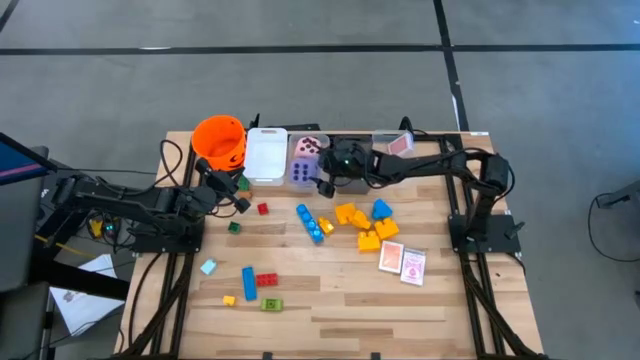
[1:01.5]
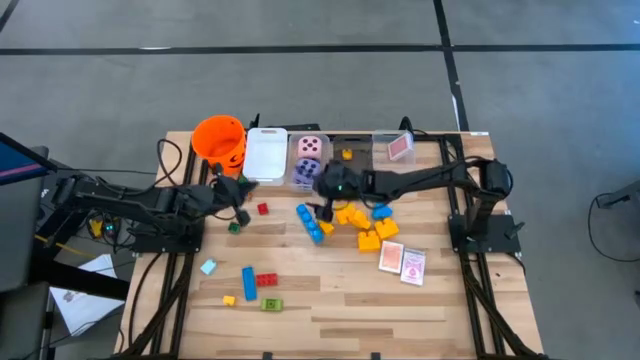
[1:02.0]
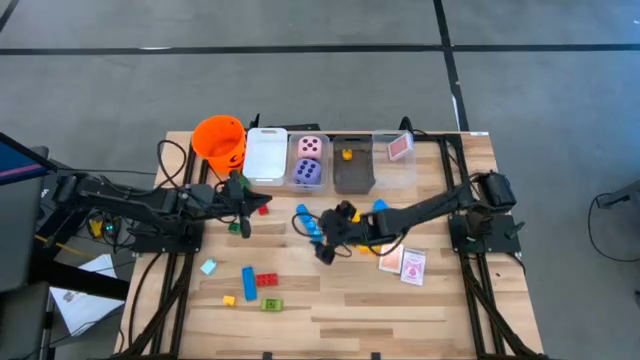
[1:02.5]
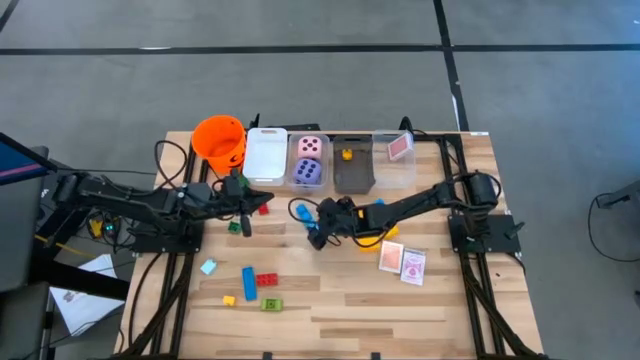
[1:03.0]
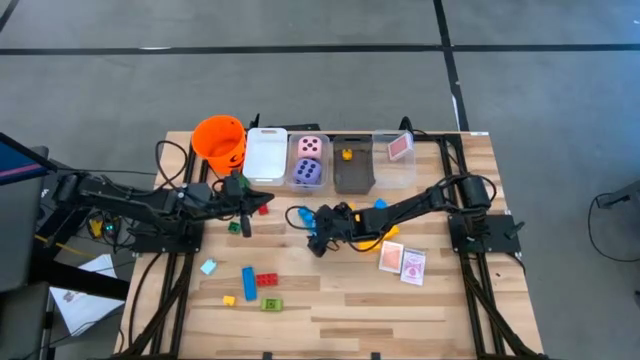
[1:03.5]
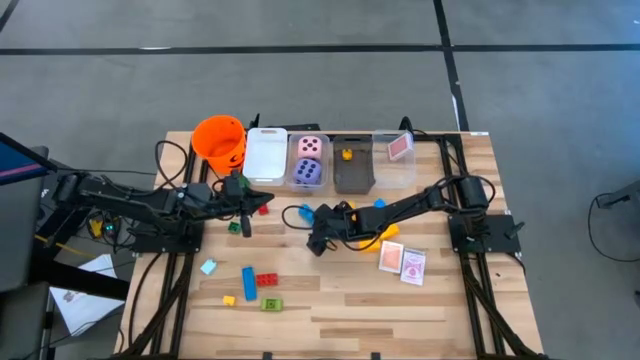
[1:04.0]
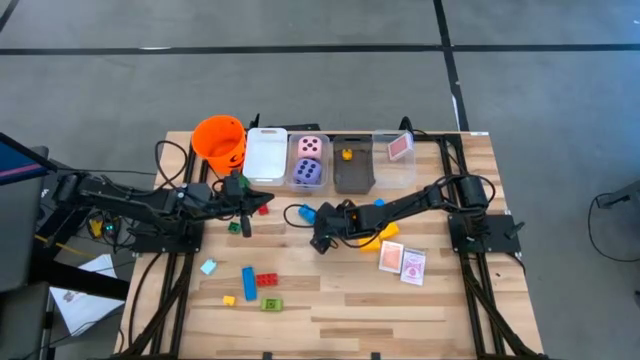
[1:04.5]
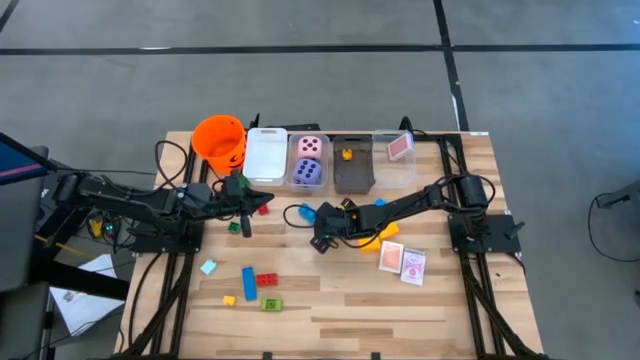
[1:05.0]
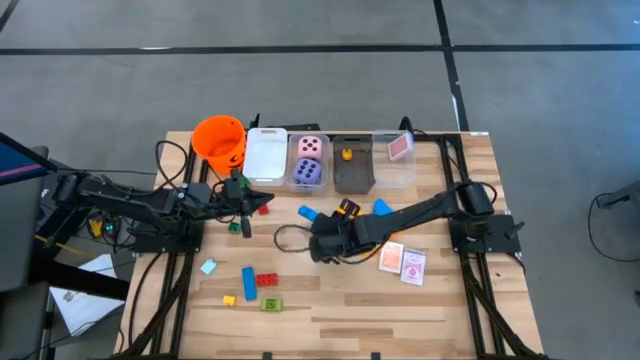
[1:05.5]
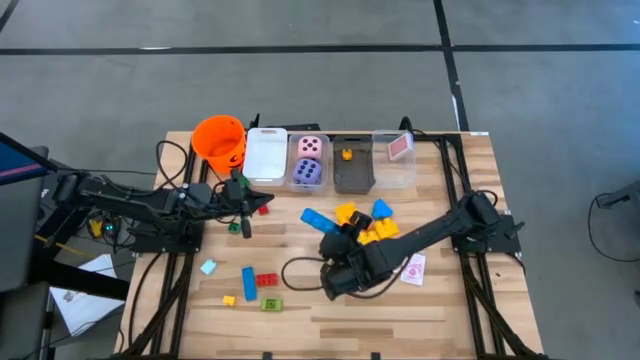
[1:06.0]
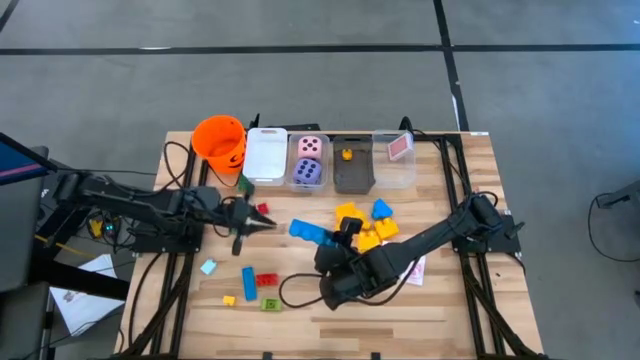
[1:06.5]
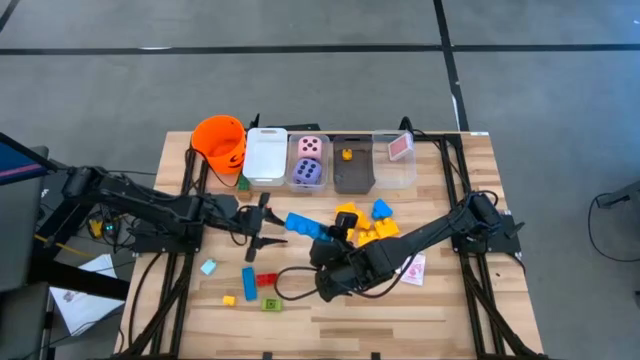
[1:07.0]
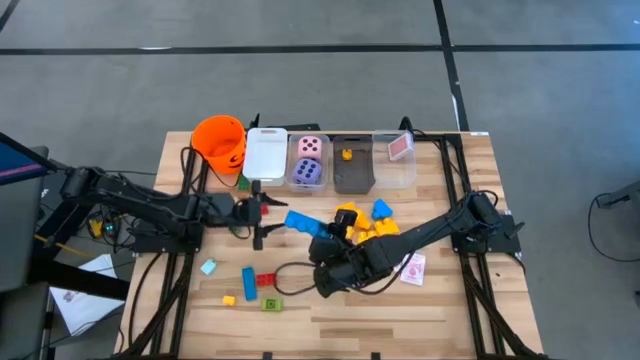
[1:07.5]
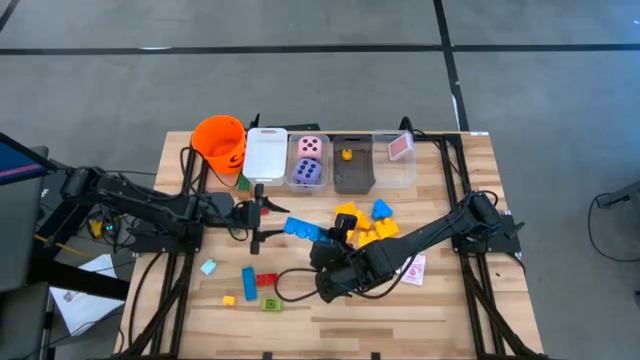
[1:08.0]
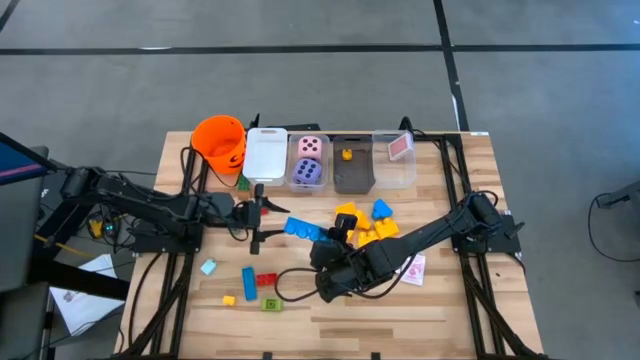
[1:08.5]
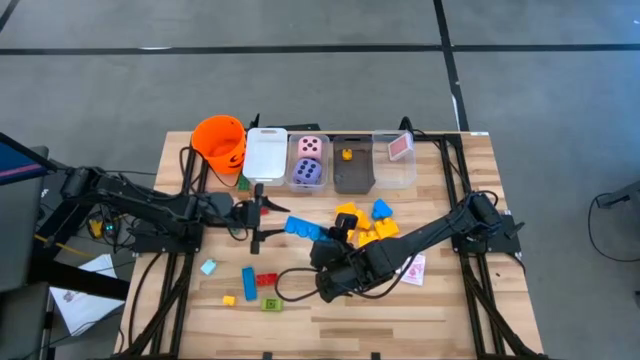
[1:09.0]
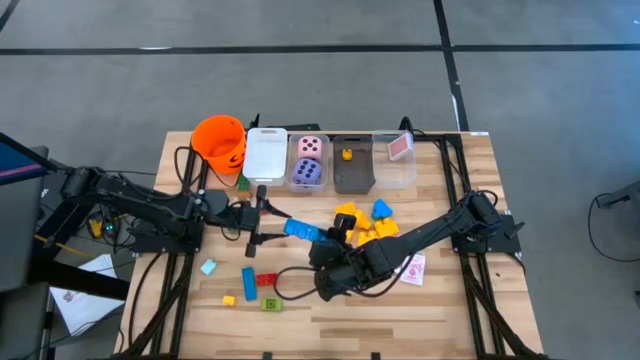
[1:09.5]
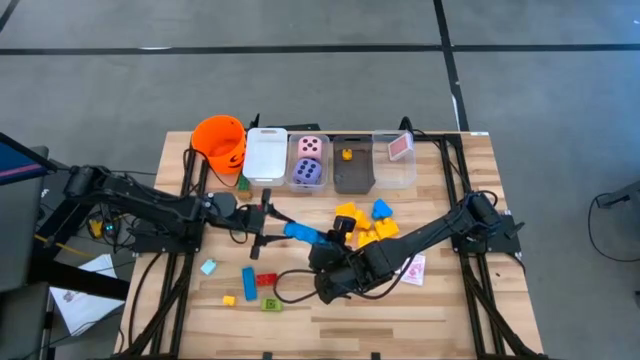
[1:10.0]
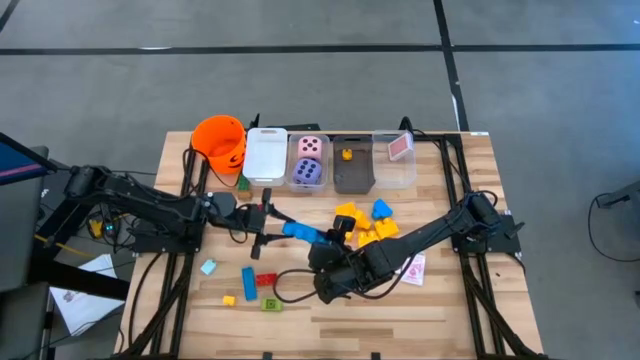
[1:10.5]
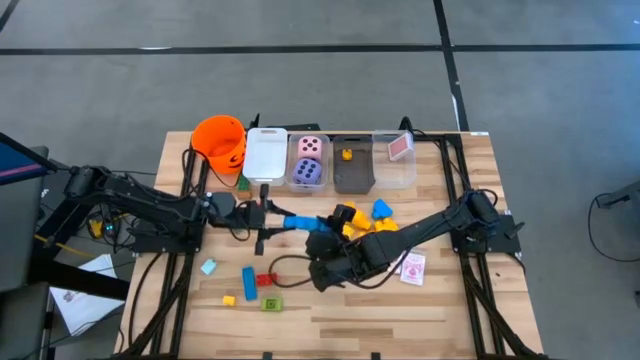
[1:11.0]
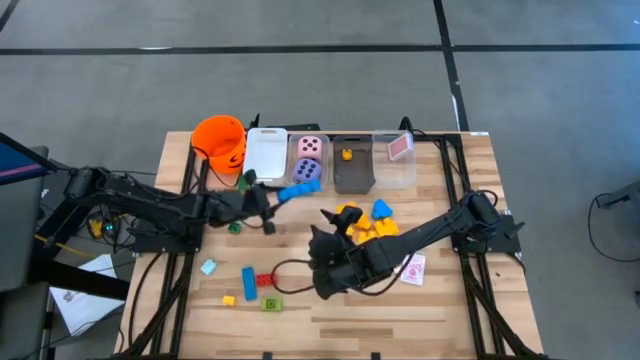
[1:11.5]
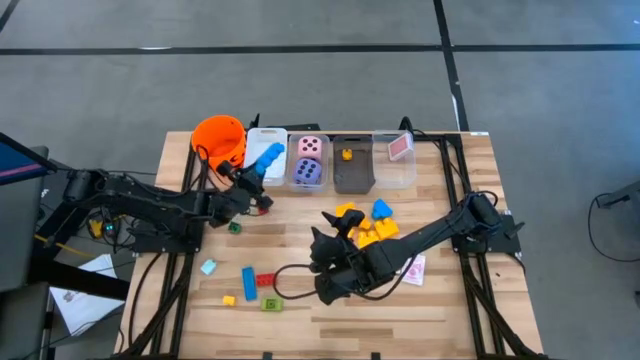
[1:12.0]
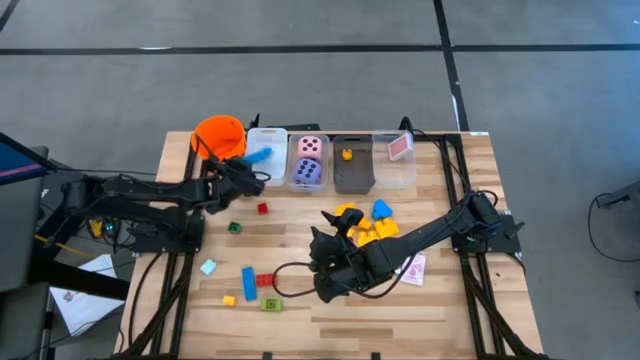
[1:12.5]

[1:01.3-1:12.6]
Task: Pick & Place Toys
Put the blue stud game piece into the white bin

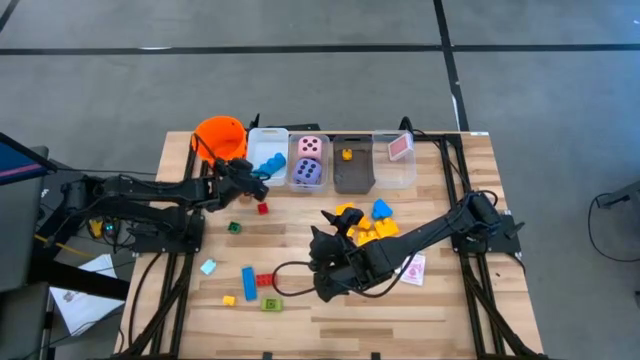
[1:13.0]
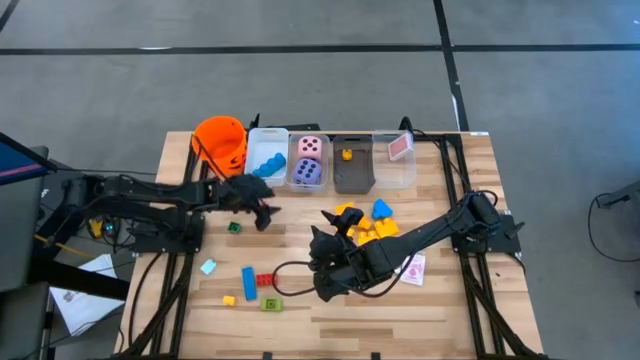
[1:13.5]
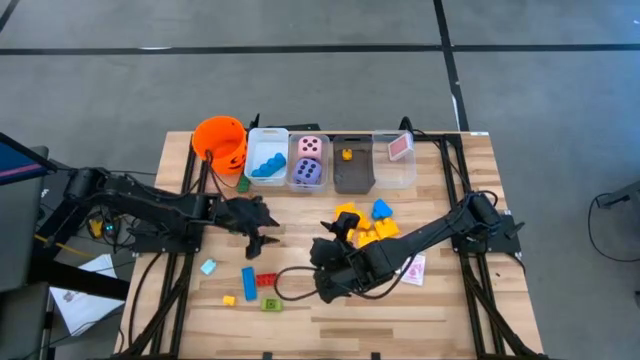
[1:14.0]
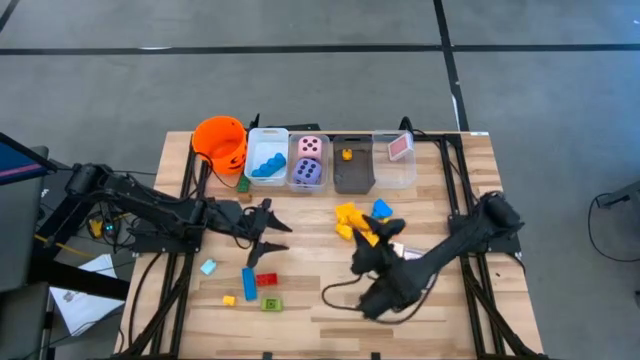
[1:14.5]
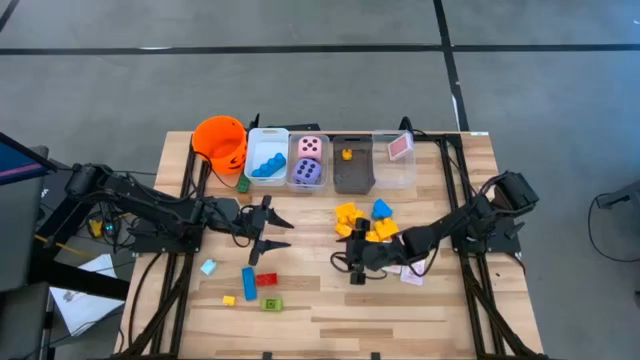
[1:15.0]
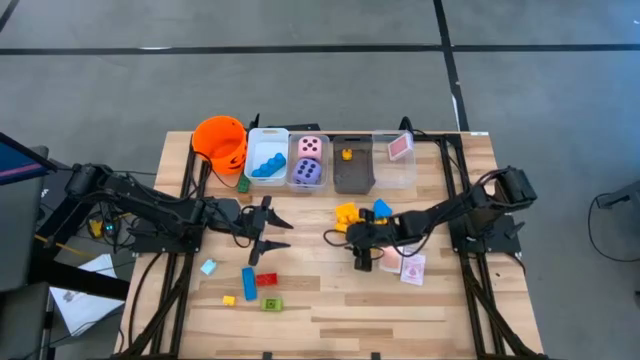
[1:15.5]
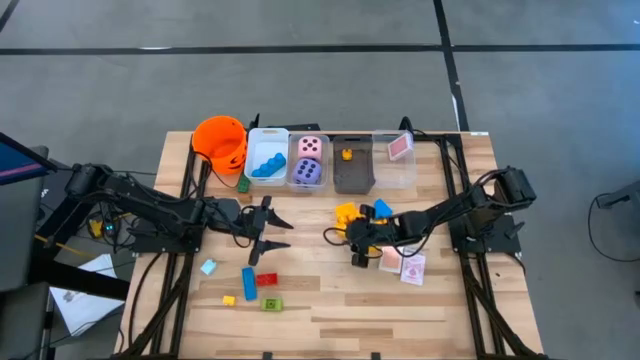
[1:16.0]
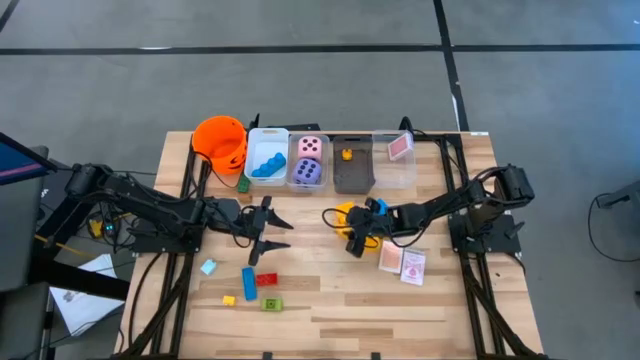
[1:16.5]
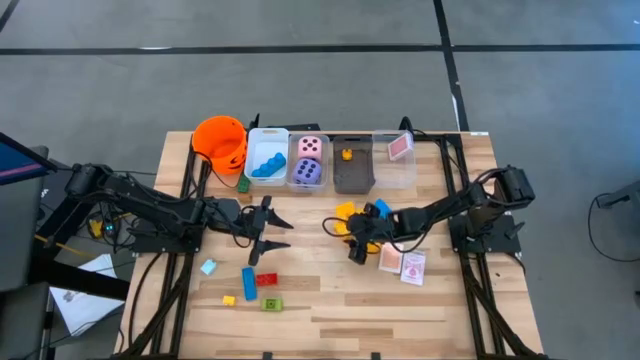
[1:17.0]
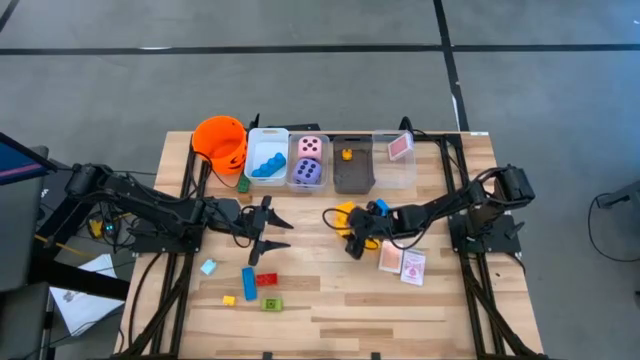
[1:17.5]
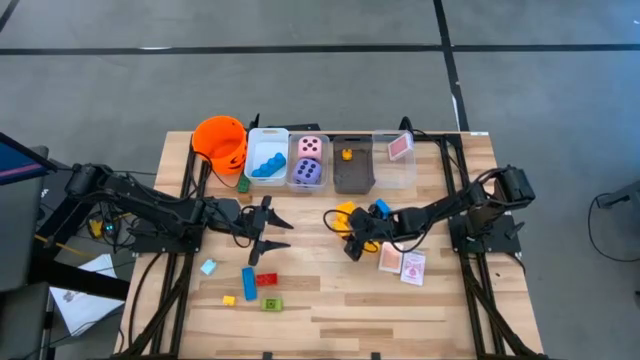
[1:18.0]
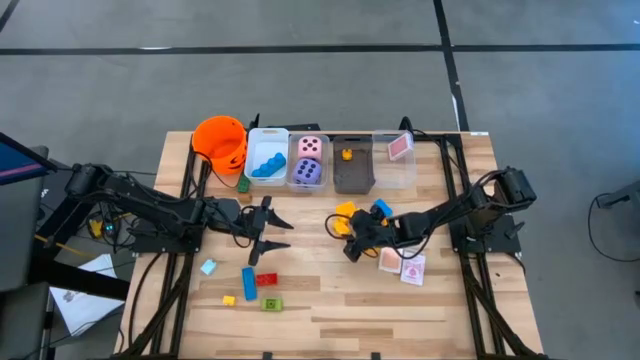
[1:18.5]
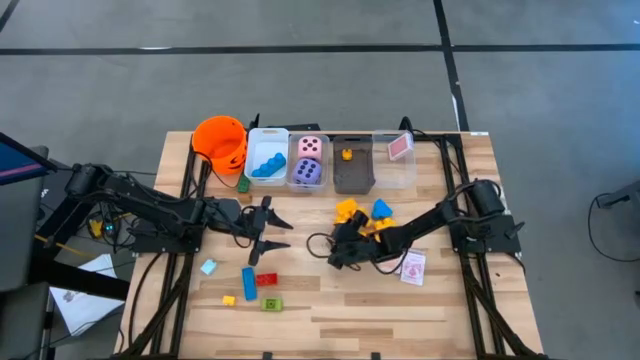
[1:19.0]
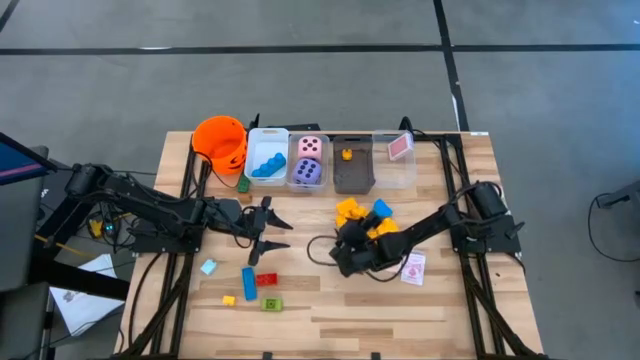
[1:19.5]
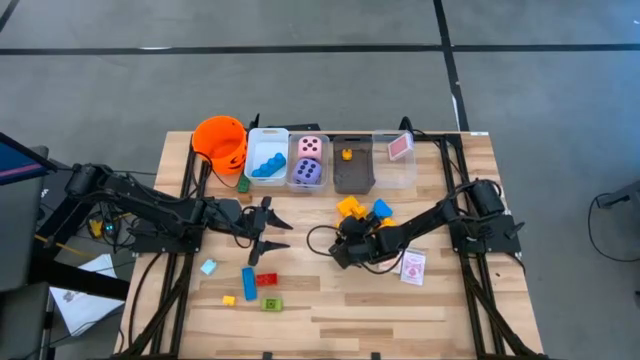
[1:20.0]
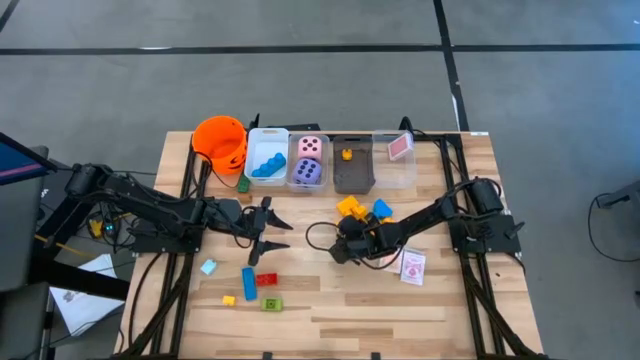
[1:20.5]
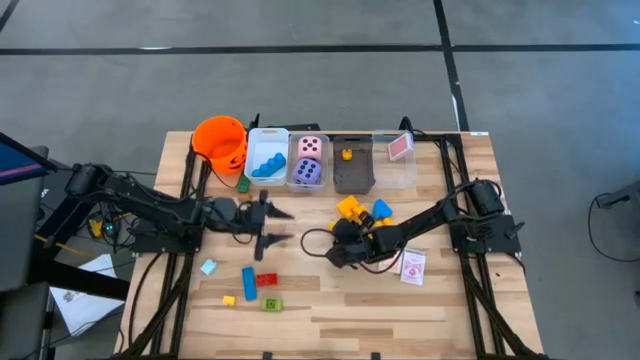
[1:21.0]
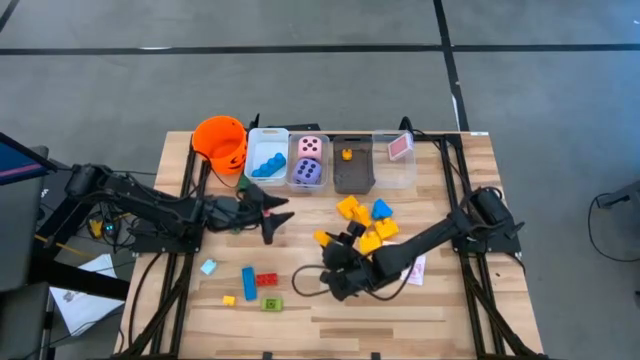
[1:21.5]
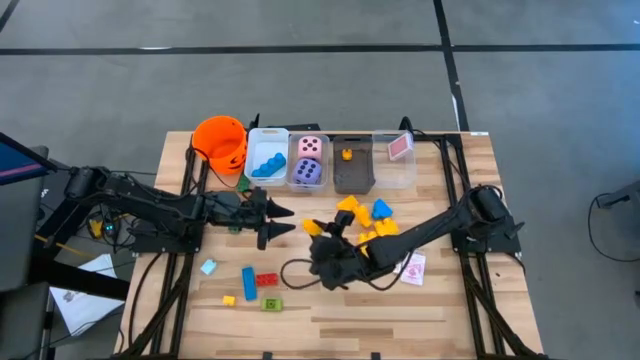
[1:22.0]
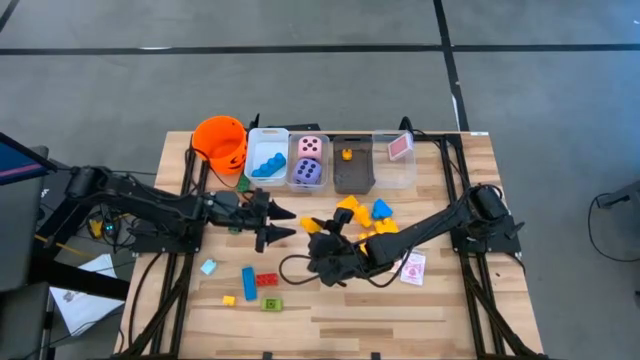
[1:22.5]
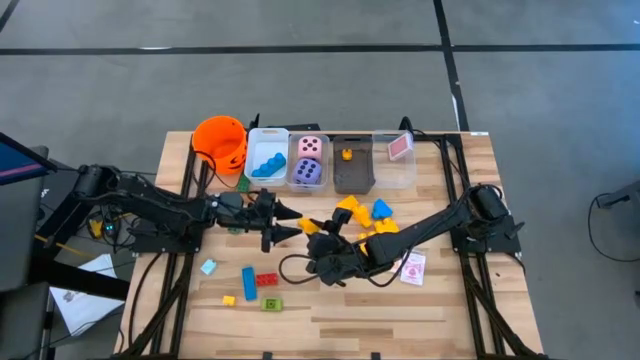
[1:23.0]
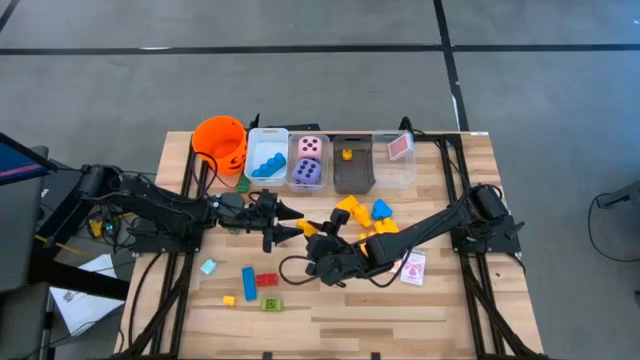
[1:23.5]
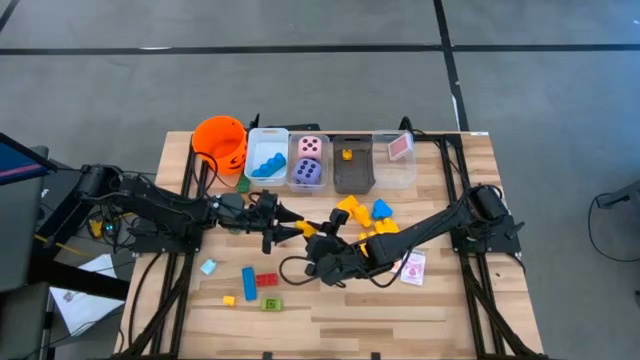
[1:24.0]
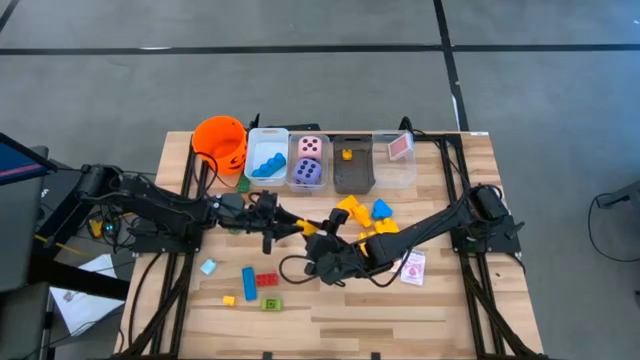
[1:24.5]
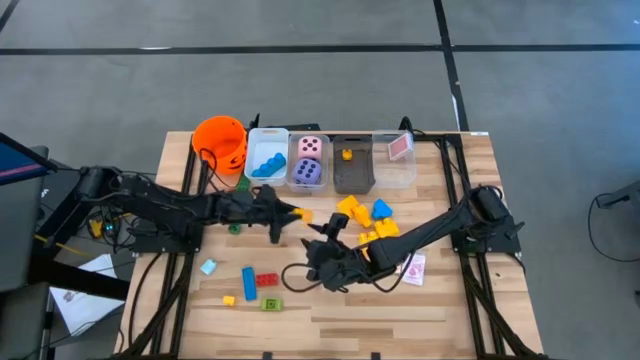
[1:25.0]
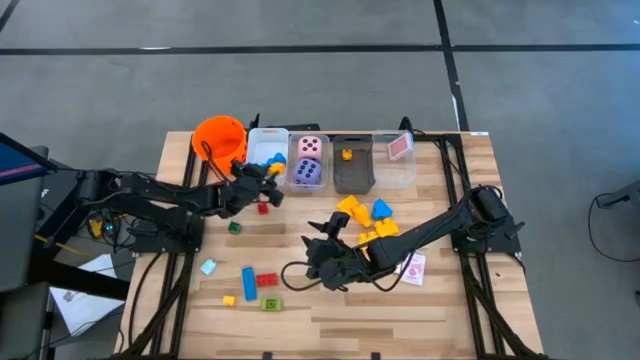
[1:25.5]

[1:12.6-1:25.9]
Put the yellow stud game piece into the white bin
